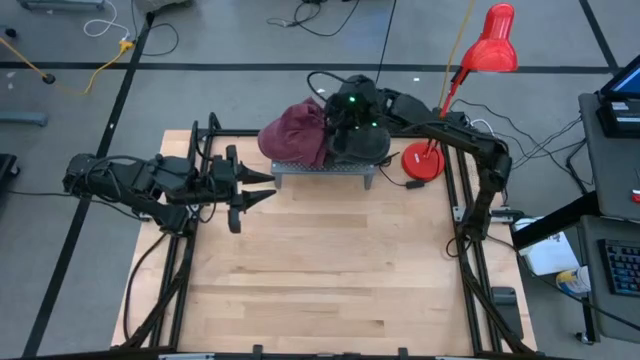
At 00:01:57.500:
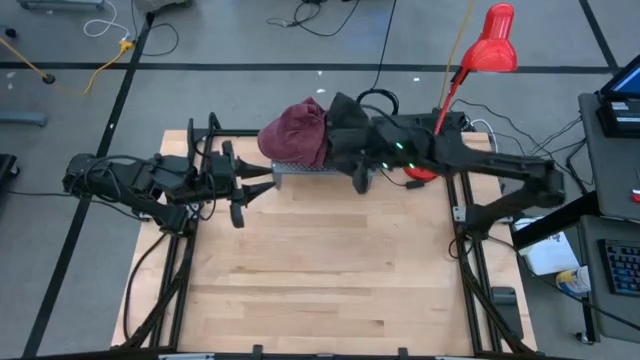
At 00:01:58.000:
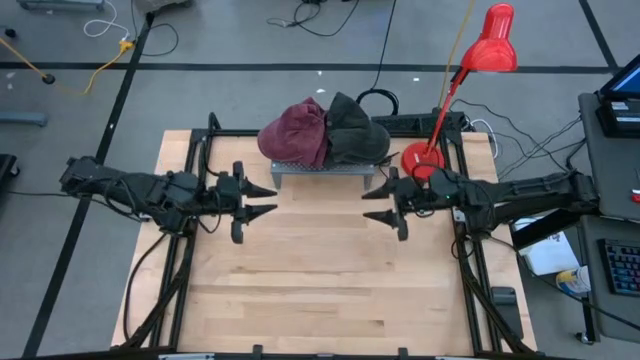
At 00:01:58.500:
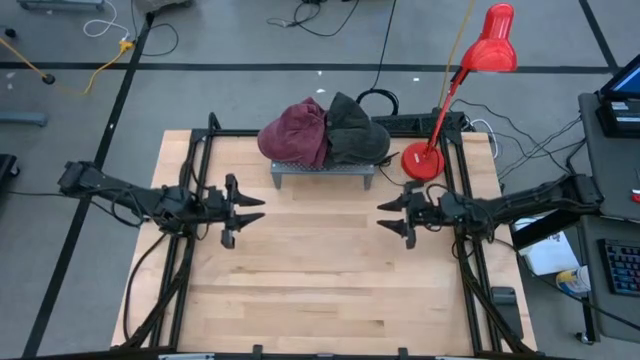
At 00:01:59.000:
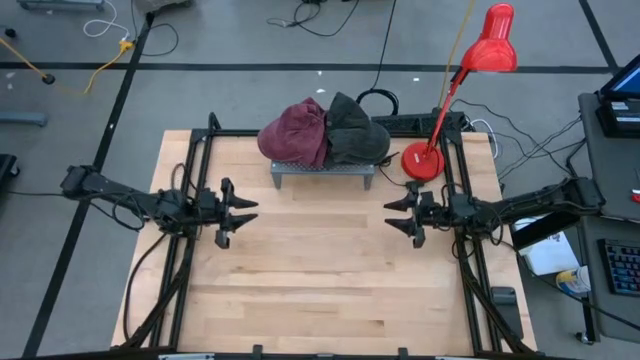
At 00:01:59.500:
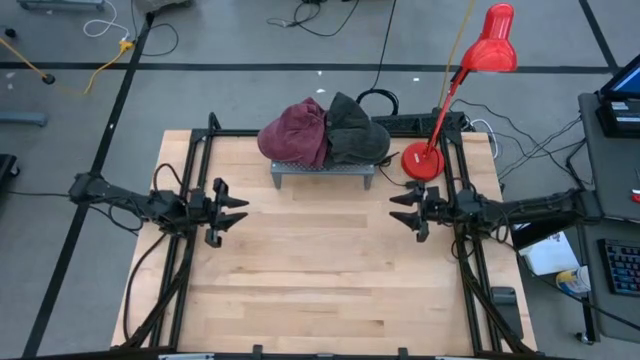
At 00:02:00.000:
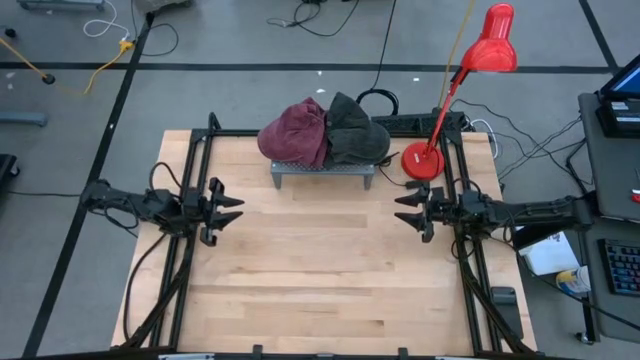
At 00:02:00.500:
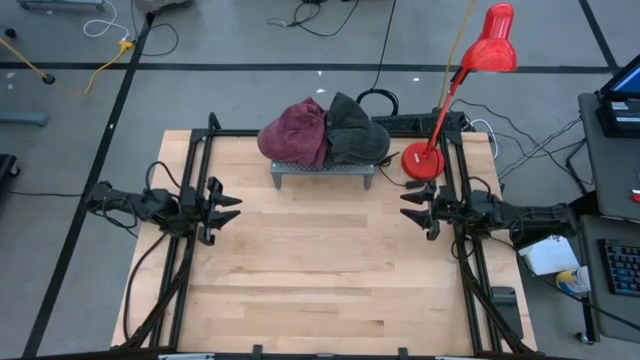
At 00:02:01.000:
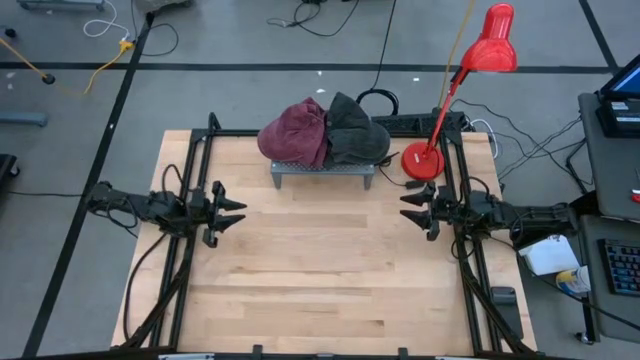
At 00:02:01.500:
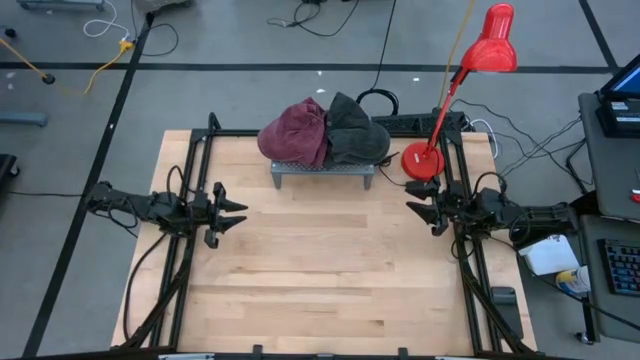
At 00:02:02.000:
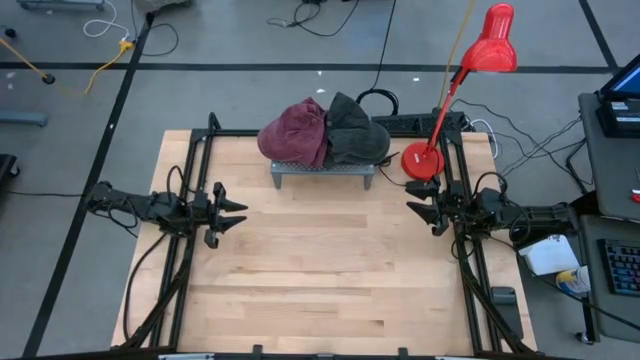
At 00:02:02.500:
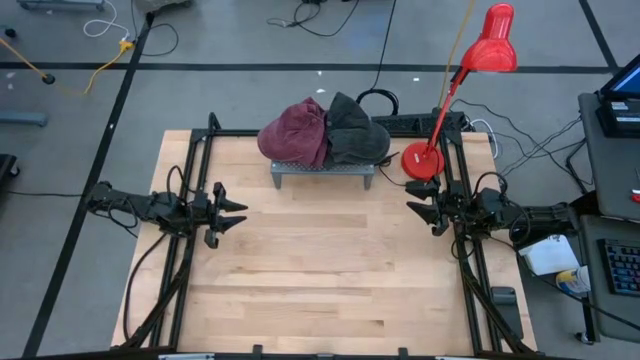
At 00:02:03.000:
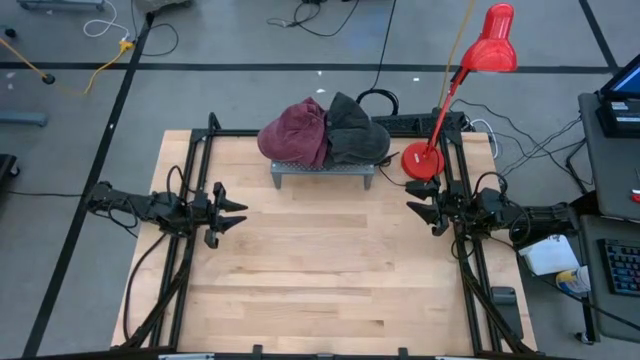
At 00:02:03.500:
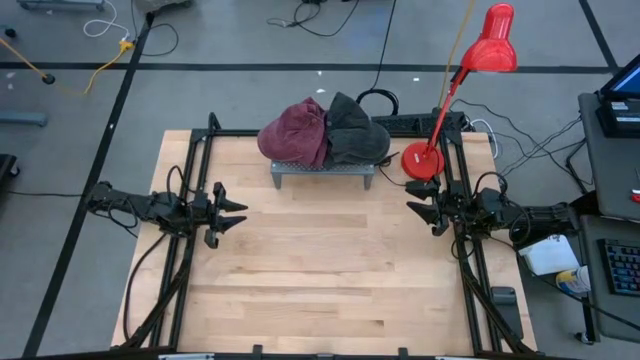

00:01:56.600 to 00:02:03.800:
Task: Pick & Place hat
Return to Home Position

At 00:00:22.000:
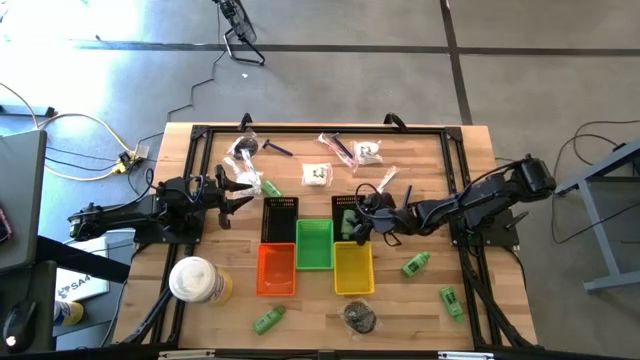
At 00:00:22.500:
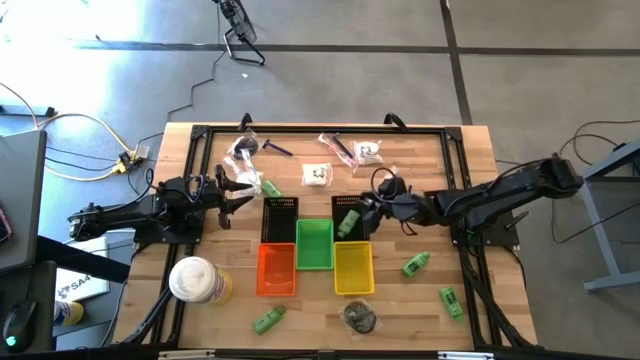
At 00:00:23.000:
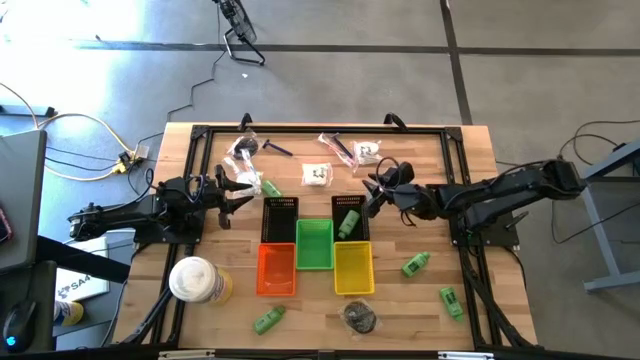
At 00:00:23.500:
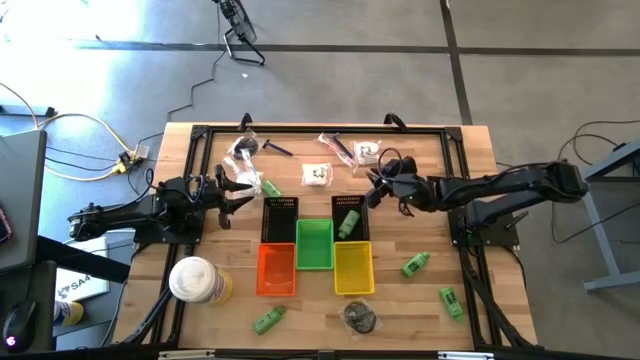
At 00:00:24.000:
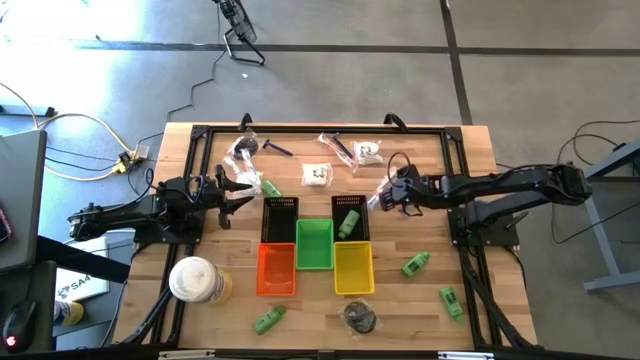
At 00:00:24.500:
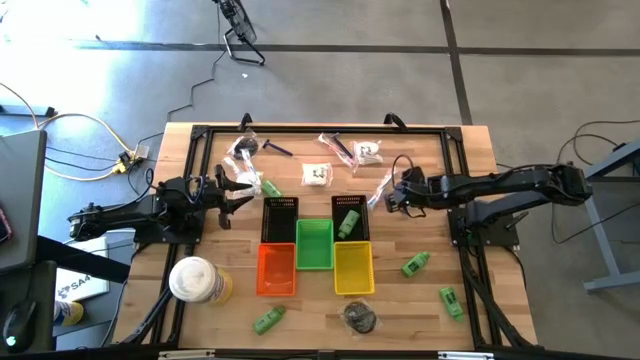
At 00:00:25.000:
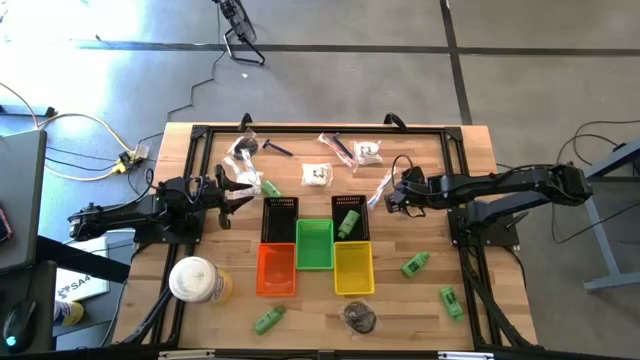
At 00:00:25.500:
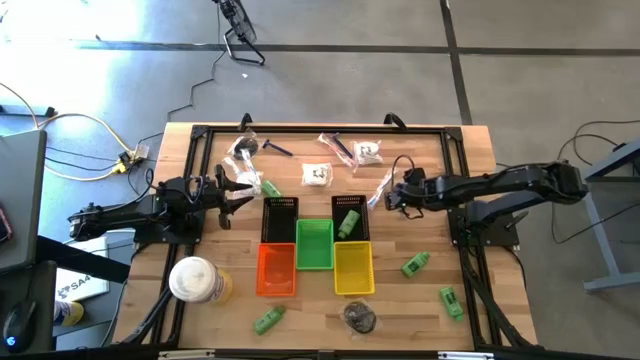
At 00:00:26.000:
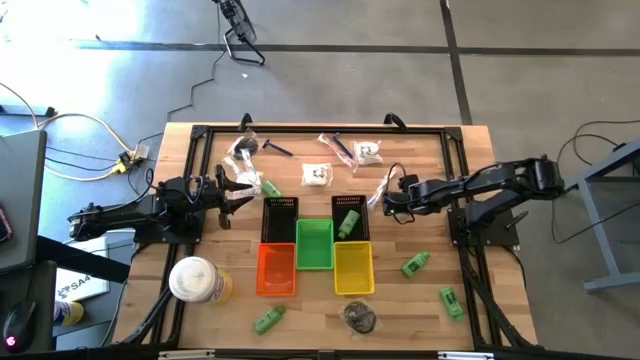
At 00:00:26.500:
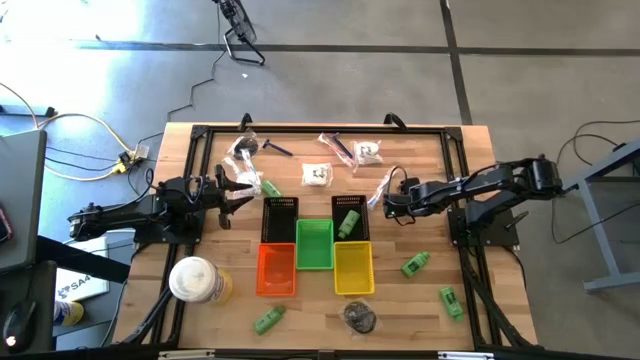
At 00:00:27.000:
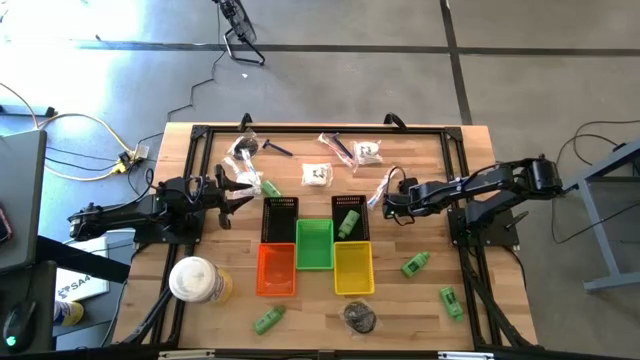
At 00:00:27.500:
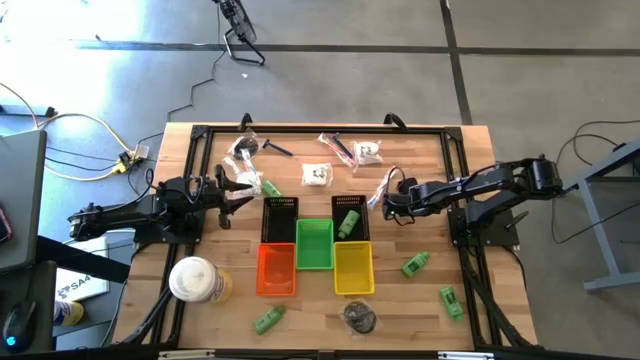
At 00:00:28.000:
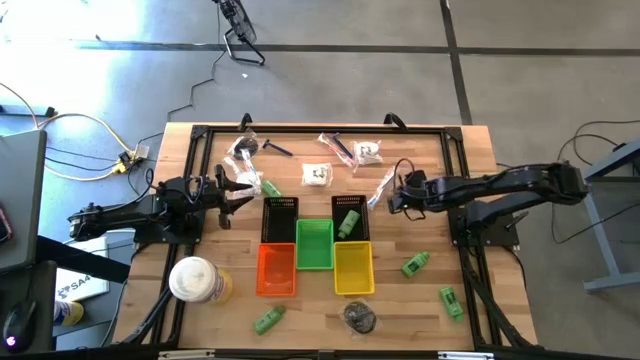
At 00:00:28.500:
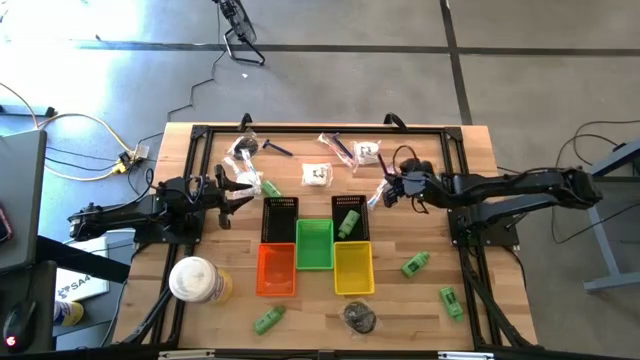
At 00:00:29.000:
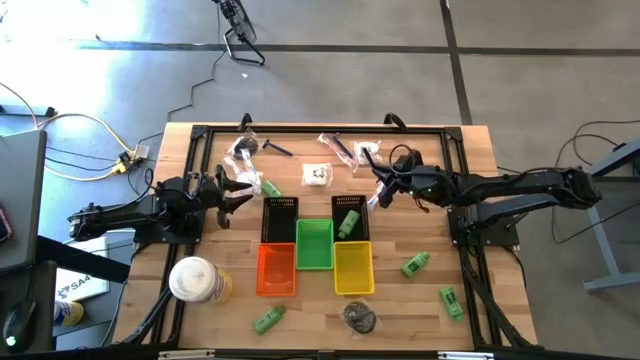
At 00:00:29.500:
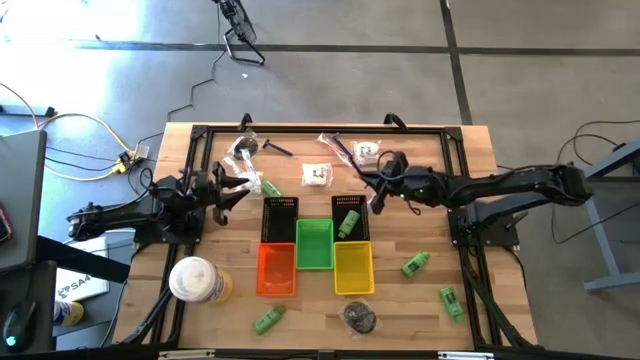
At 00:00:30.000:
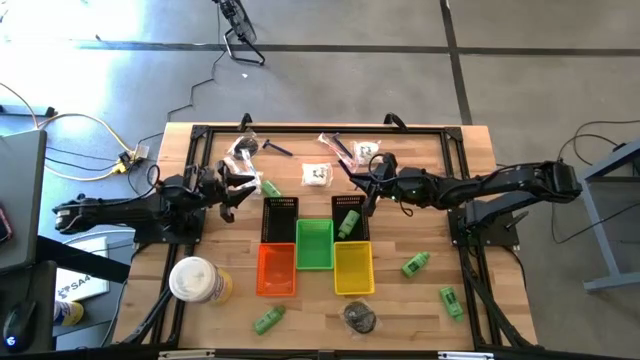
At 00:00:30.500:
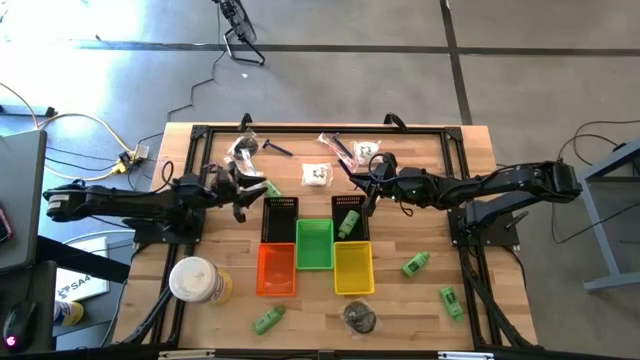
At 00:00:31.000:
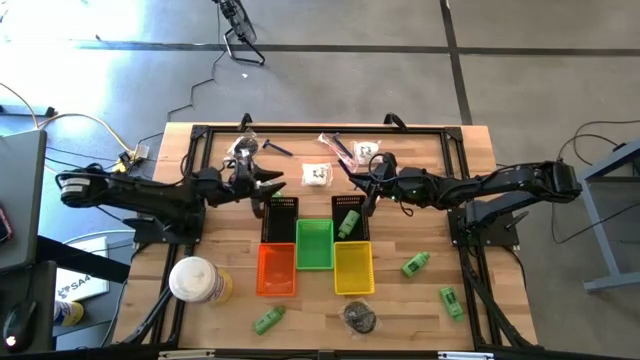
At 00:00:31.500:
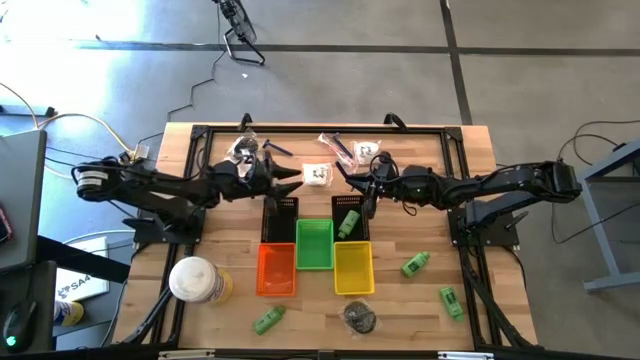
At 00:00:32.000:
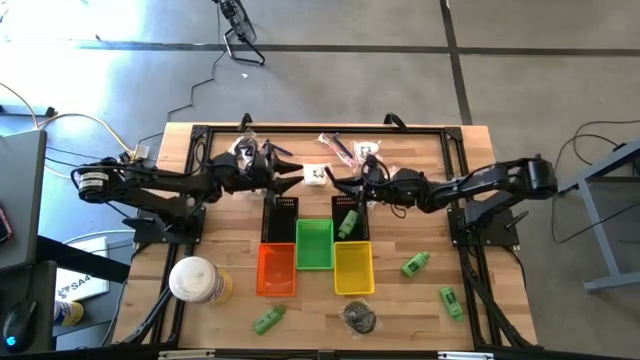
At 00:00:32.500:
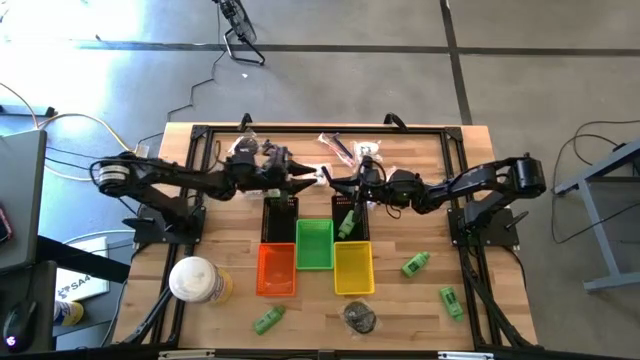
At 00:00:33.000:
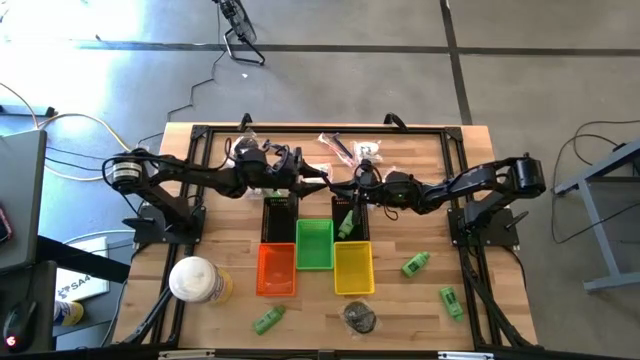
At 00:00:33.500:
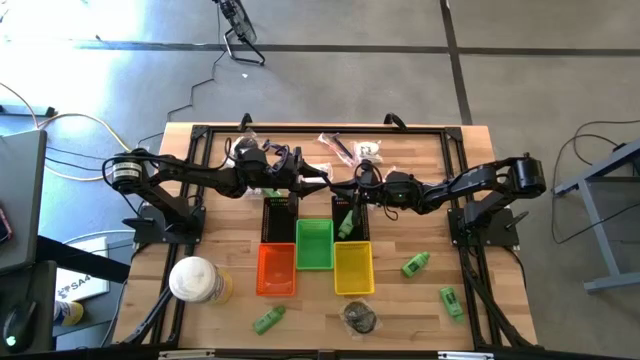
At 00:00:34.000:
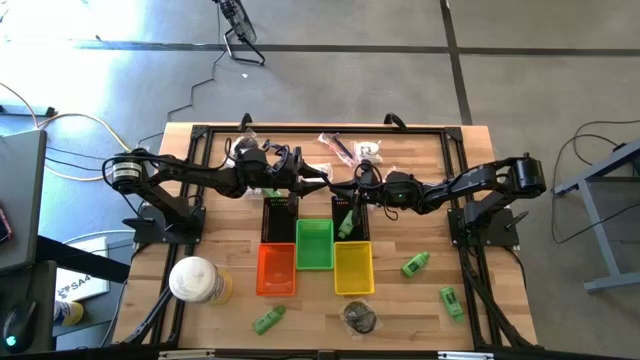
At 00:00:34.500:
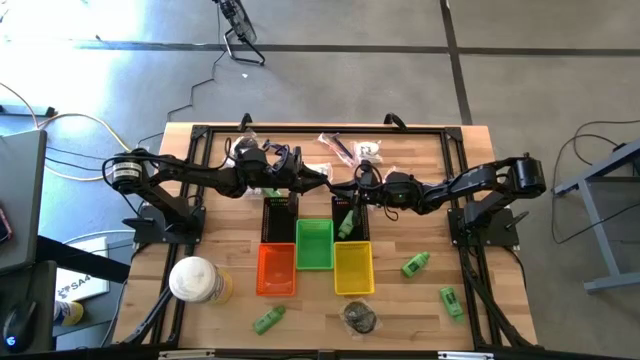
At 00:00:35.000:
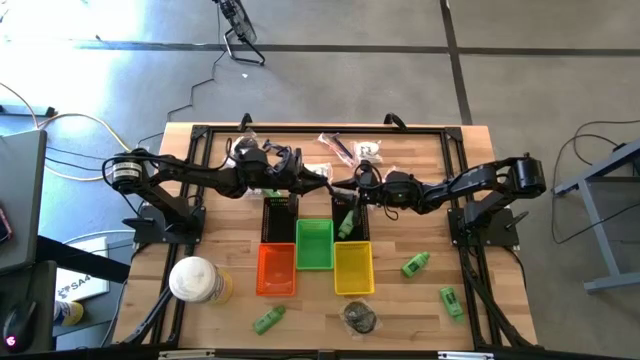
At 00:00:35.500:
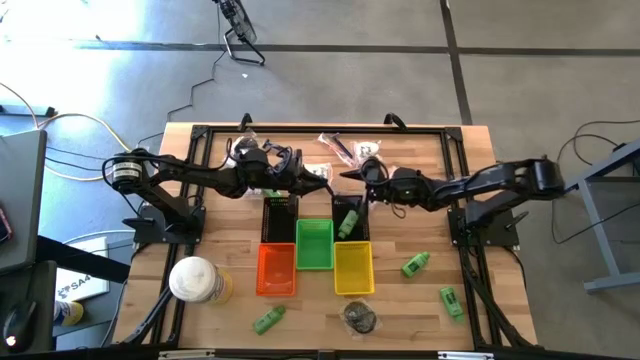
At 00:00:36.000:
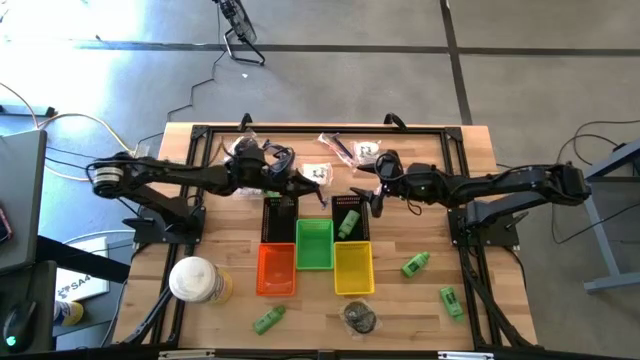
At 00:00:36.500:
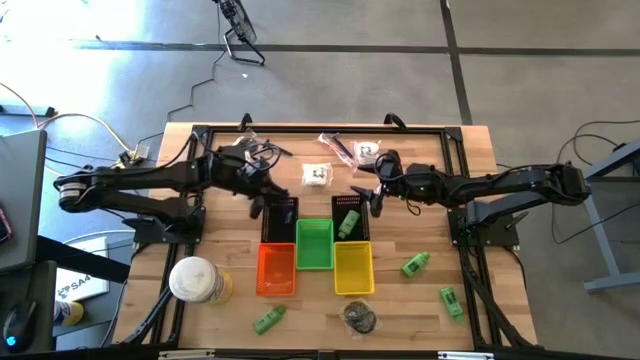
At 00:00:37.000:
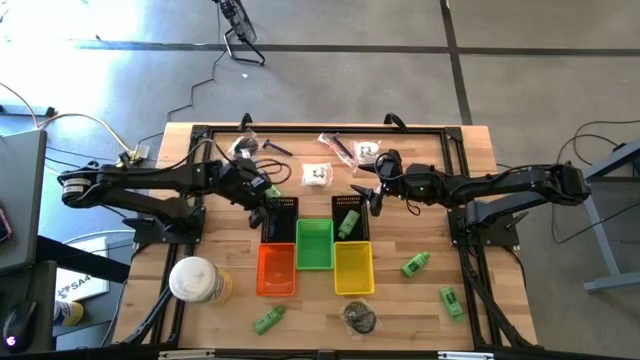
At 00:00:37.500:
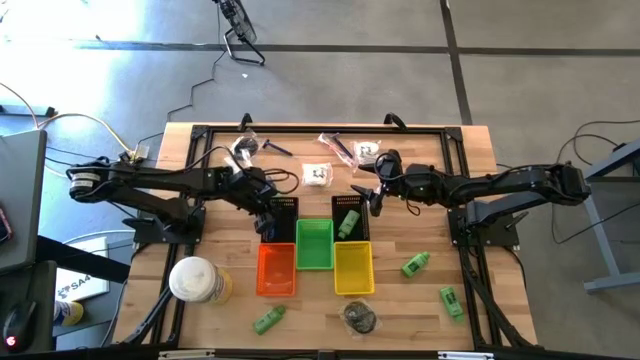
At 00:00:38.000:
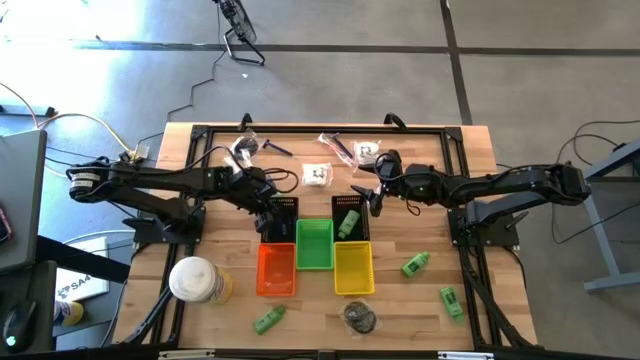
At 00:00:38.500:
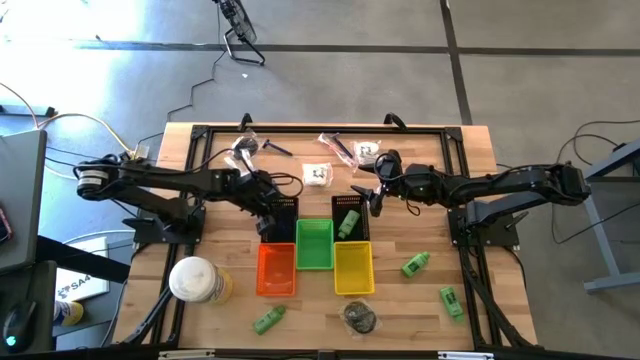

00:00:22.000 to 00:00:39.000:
Task: Pick & Place Travel size toiletries
Put the right blue razor into the left black bin
